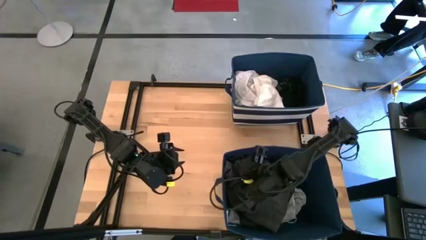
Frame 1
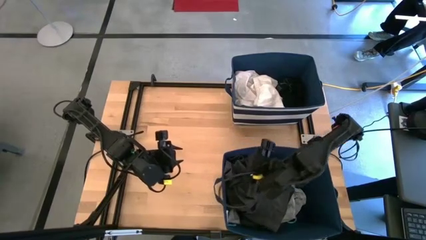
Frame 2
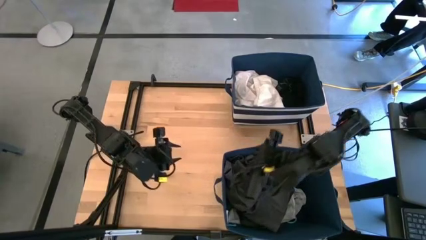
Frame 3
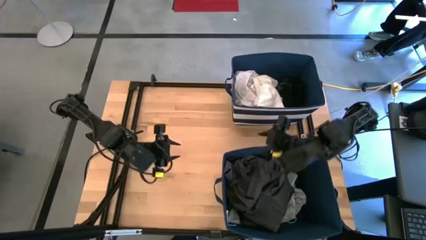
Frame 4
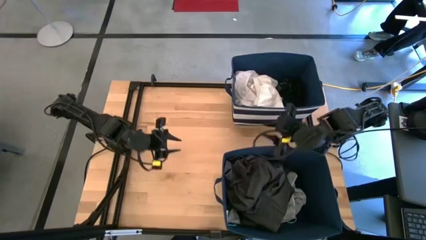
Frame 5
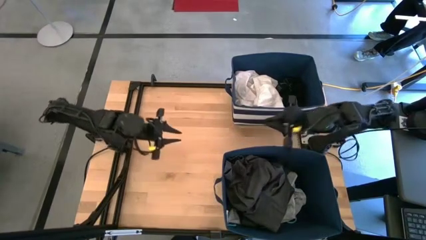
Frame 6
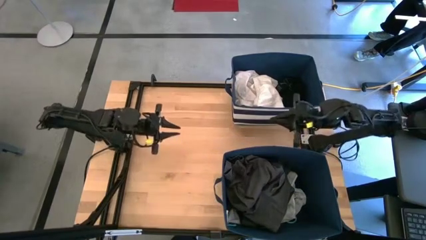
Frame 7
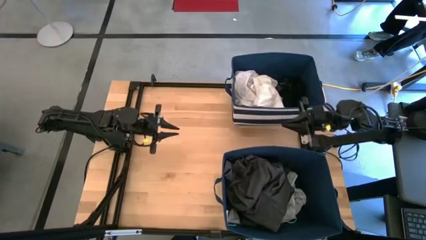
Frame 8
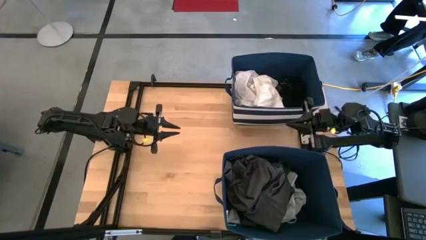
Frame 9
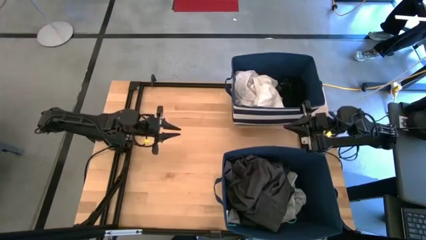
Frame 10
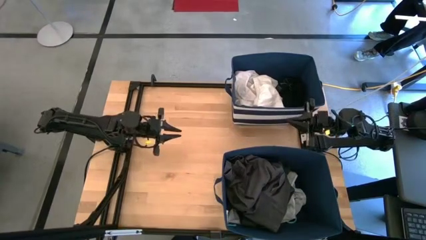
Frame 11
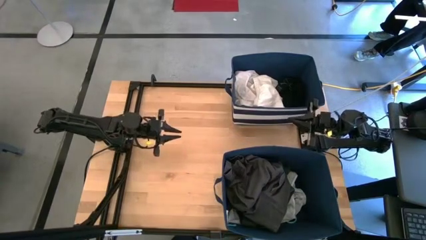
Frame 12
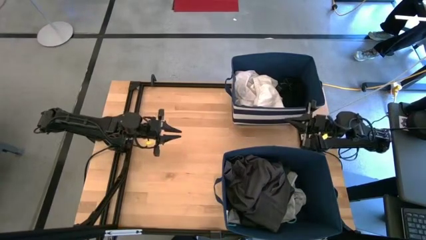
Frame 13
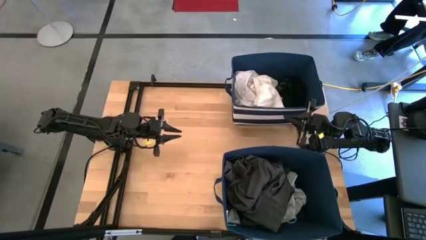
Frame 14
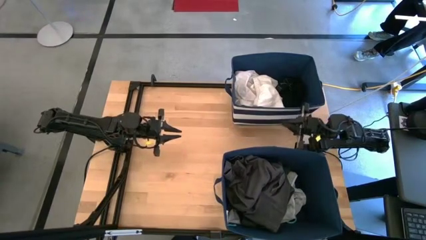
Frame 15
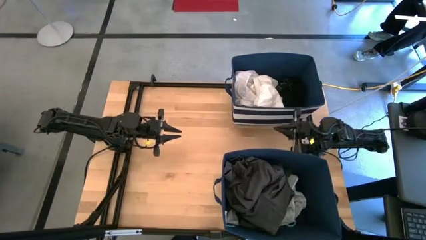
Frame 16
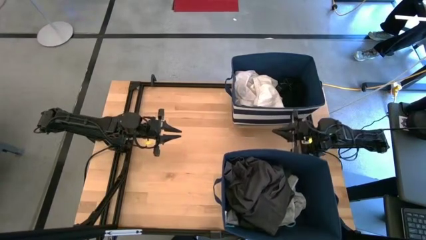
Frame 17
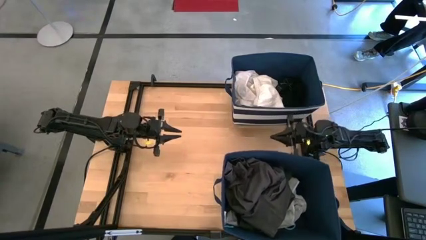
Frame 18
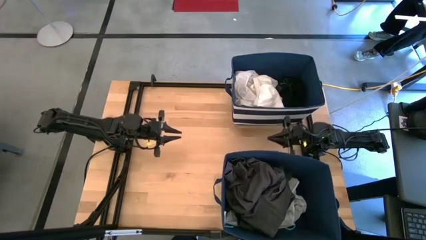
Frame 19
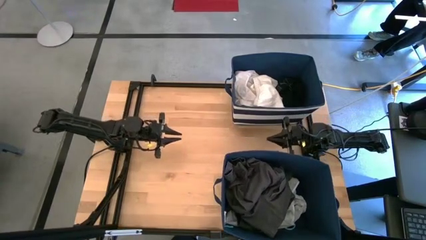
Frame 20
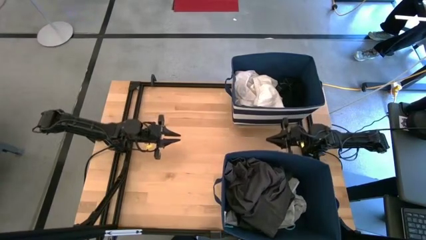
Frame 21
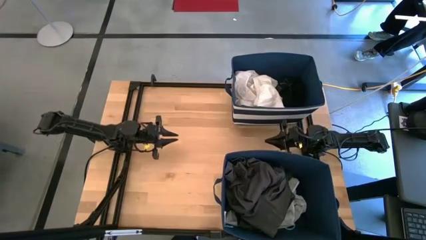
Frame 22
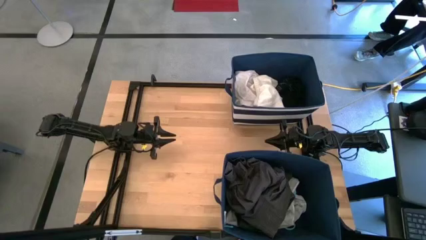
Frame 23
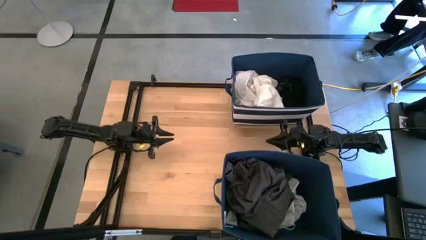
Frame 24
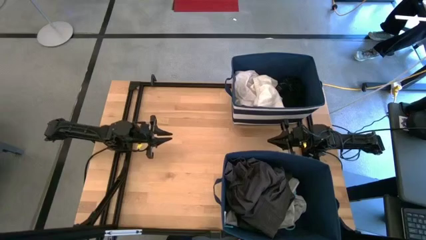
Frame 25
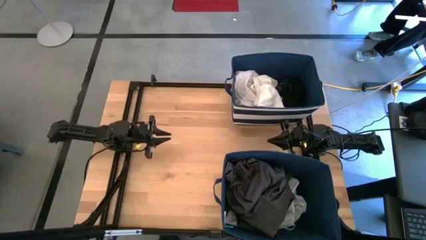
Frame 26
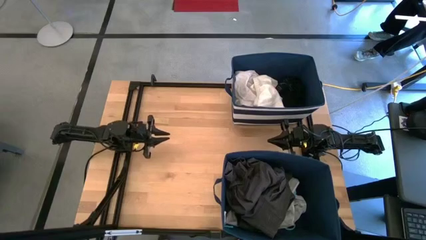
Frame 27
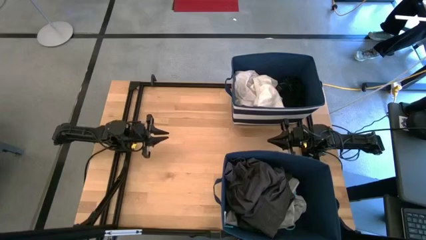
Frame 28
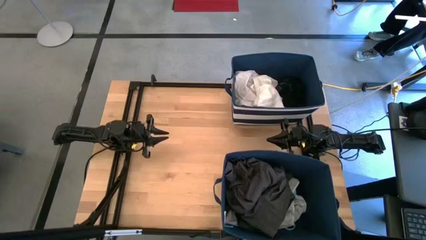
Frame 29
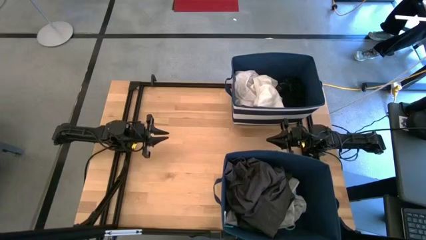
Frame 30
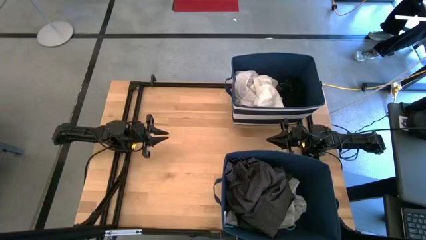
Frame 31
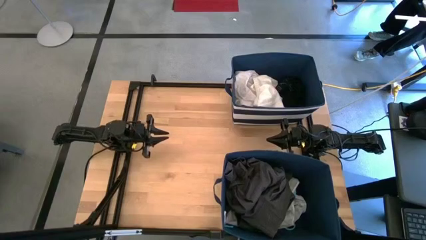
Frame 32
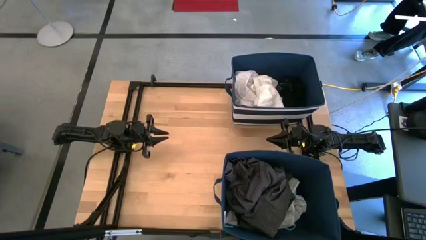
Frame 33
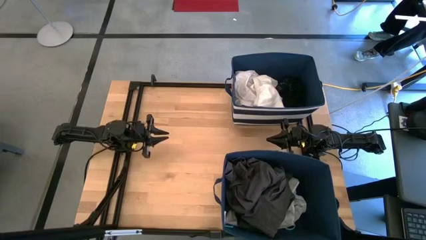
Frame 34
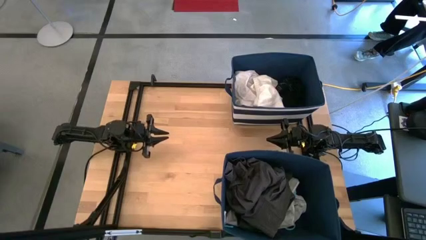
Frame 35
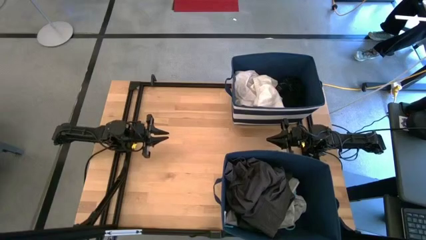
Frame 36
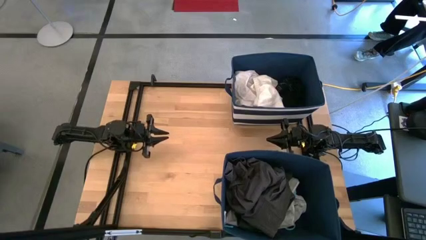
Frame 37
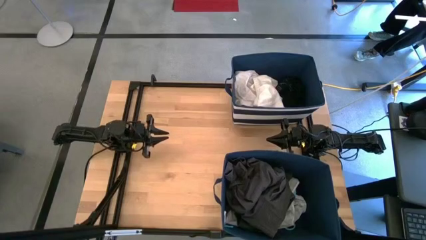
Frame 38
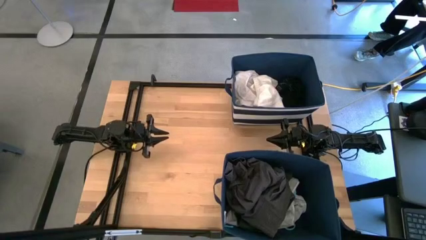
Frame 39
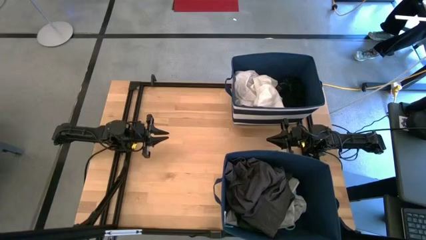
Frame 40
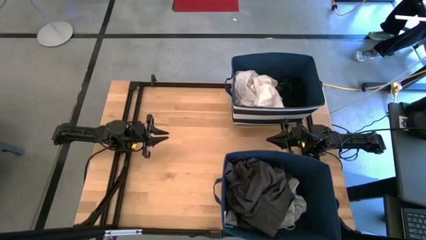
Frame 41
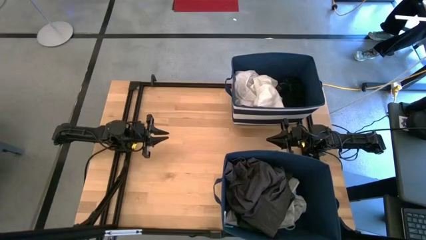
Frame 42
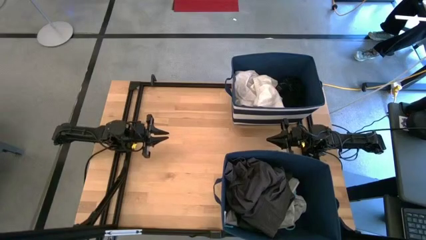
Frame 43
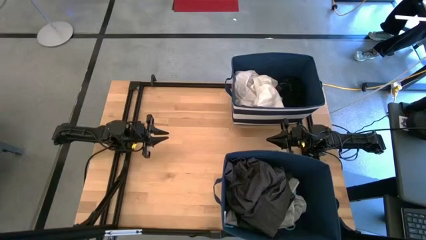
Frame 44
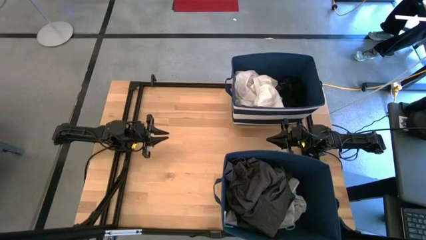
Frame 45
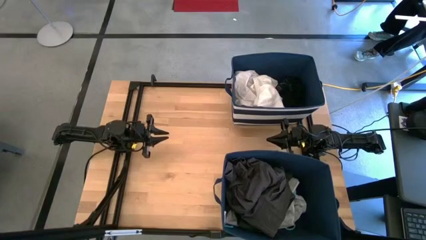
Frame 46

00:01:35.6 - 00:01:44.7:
Task: Sort clothes
Return to Home Position

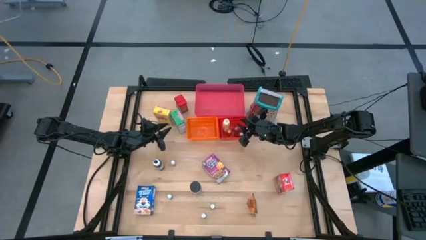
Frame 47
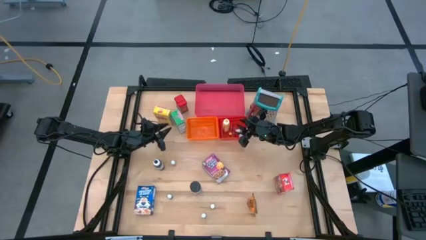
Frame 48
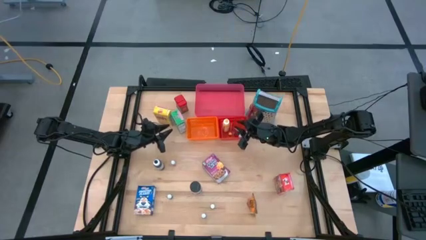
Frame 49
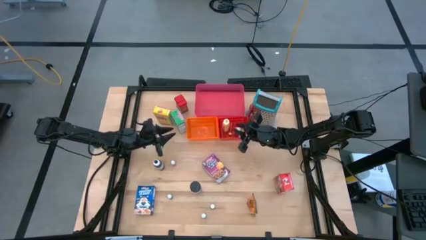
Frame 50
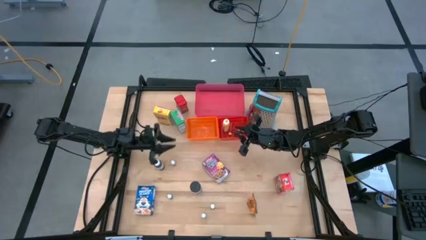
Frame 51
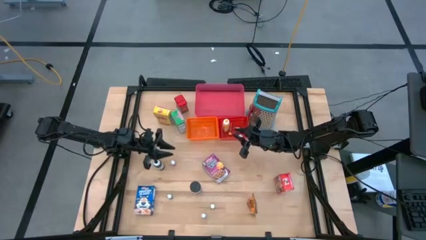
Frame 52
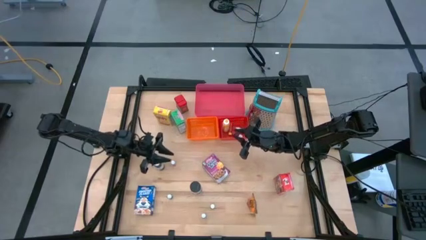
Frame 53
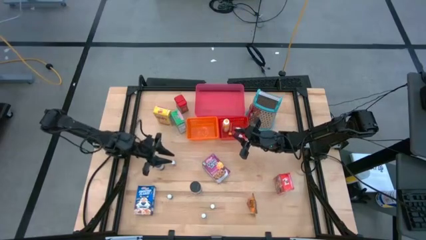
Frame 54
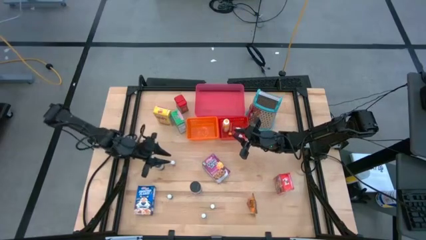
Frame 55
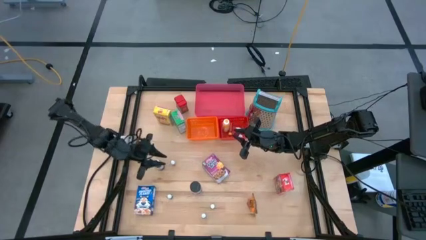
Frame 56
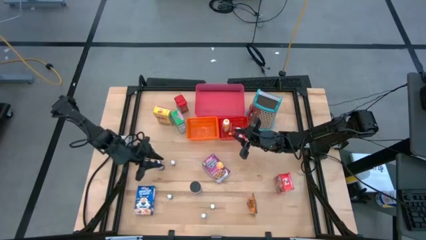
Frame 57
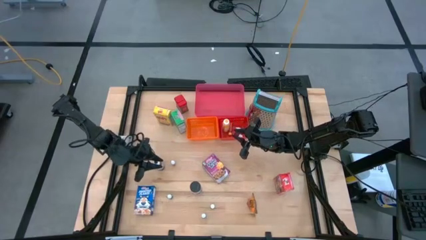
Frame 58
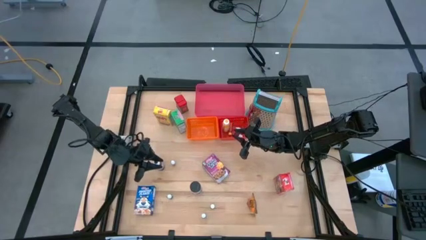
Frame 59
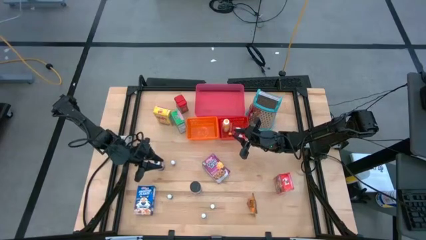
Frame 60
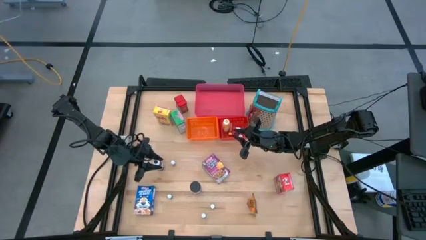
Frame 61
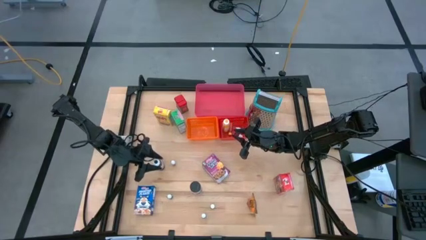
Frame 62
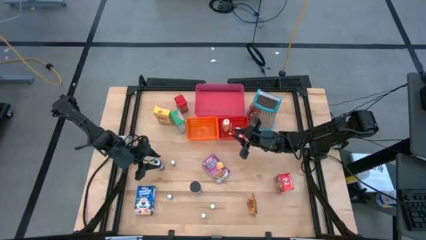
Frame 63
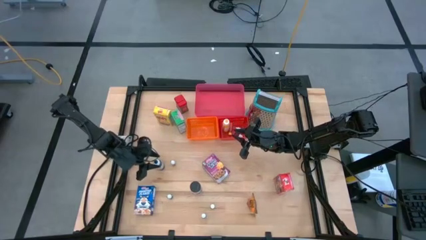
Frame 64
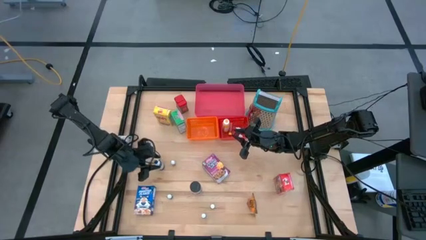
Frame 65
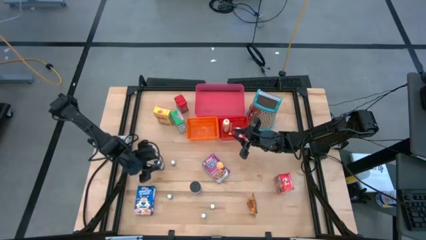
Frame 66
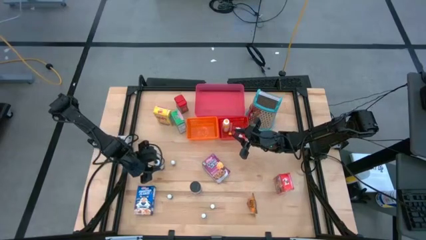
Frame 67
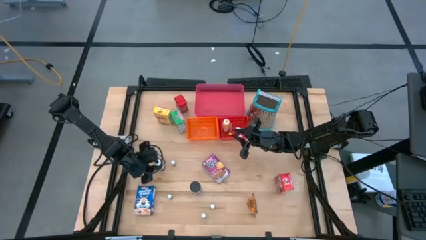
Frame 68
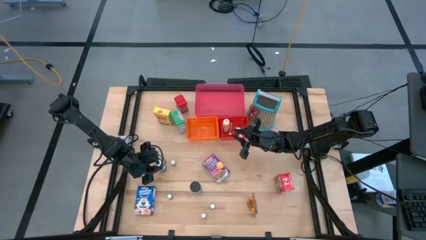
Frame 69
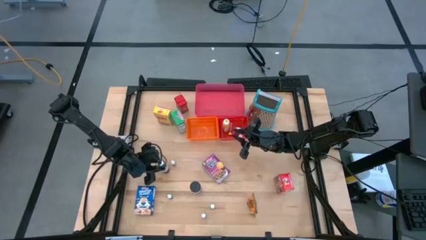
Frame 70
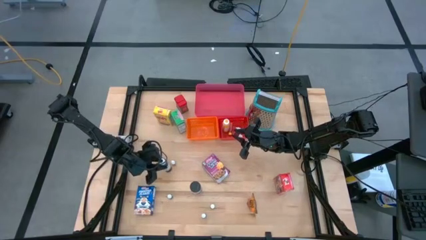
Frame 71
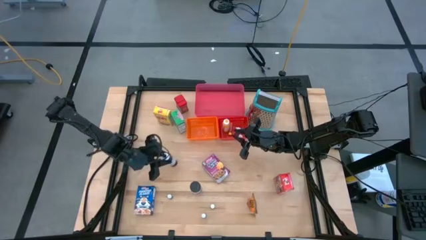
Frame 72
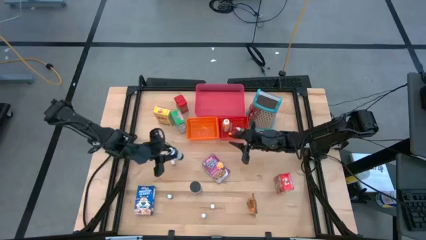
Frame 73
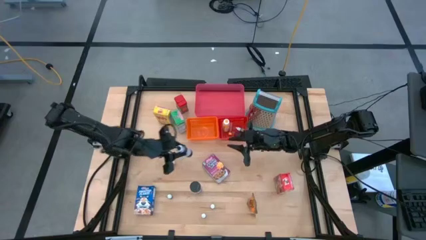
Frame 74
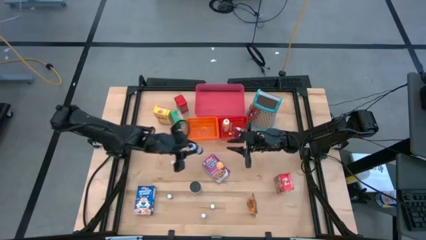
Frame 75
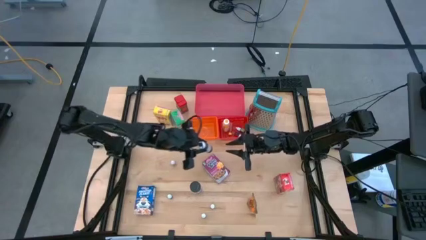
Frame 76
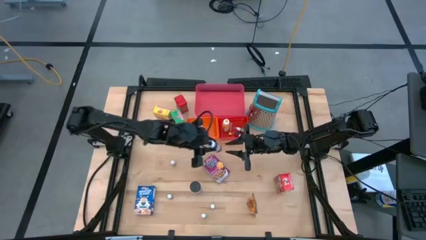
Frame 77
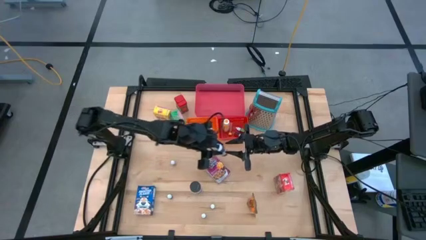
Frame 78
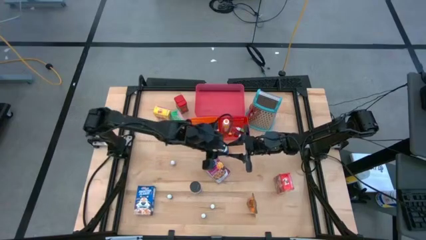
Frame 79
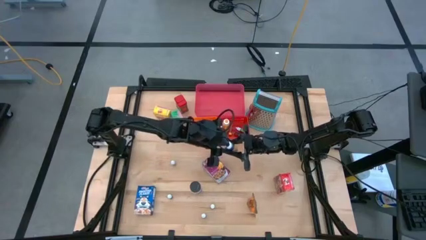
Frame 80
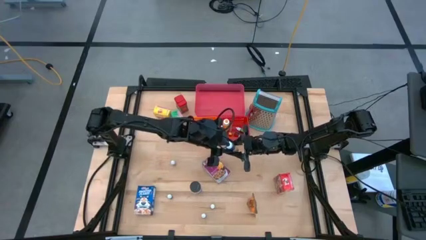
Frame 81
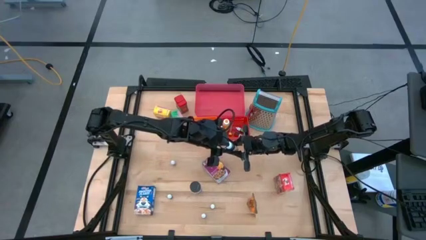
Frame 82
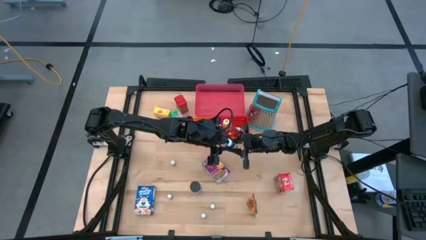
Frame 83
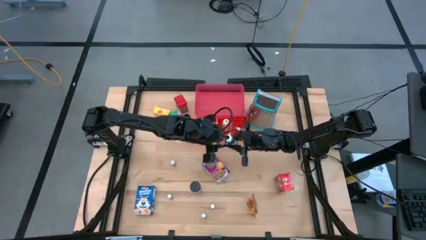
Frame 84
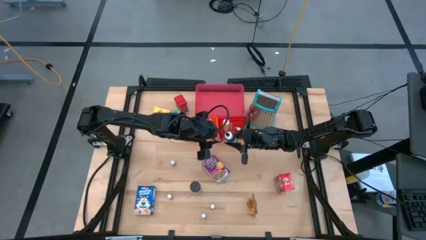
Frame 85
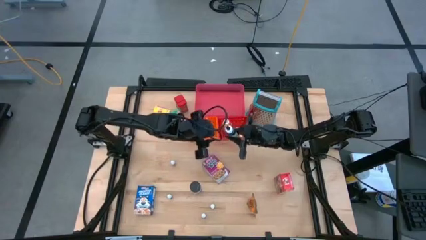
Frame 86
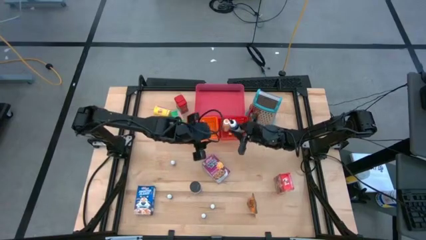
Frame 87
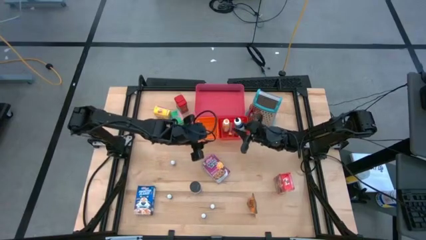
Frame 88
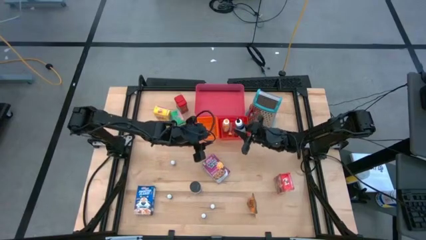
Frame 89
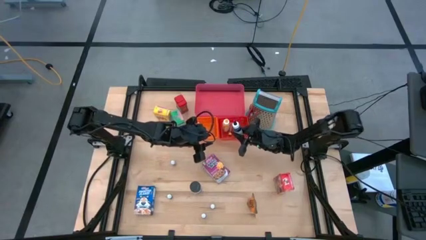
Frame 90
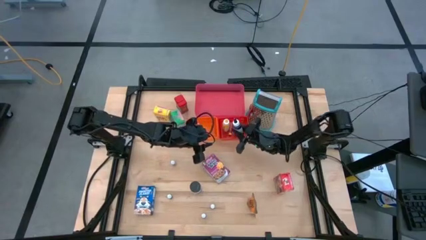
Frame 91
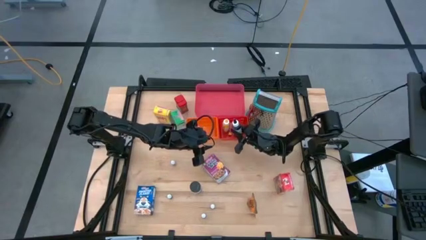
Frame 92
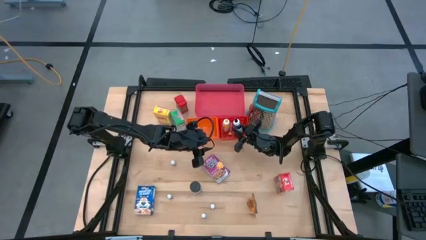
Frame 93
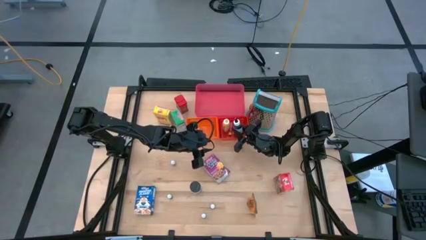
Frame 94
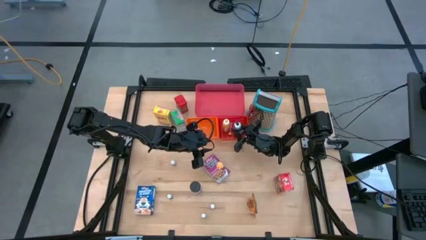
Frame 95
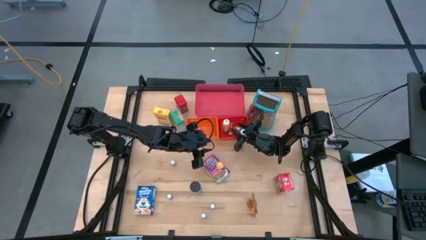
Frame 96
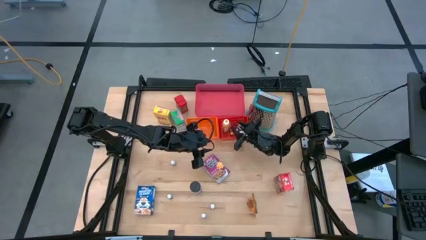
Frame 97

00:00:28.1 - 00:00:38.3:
Task: Pick & Place Kitchen Items
Put the black food coloring bottle into the red bin
